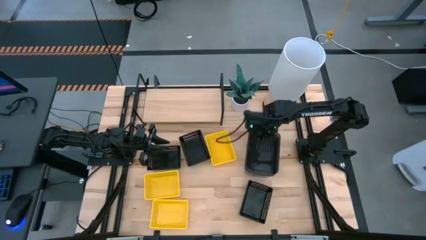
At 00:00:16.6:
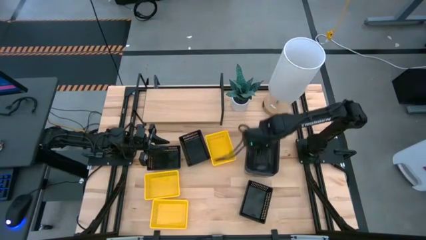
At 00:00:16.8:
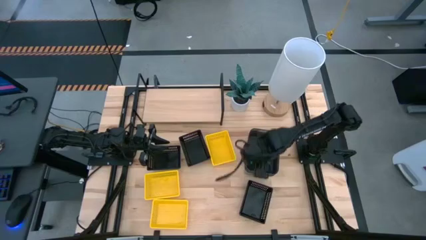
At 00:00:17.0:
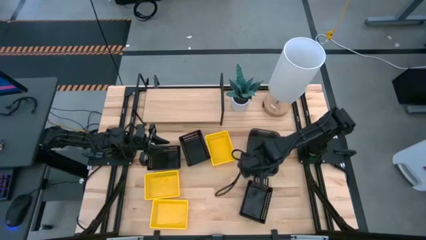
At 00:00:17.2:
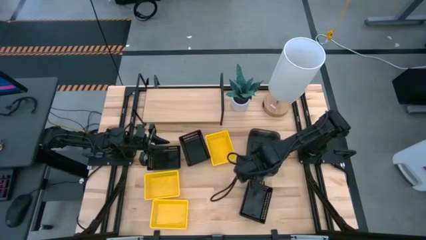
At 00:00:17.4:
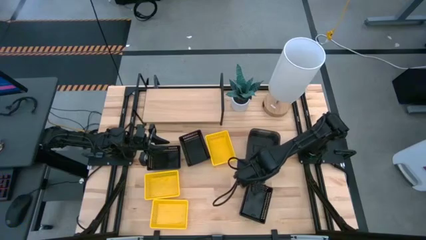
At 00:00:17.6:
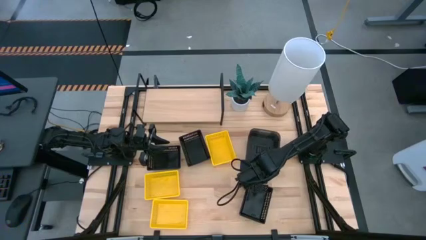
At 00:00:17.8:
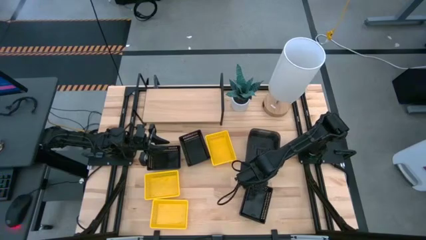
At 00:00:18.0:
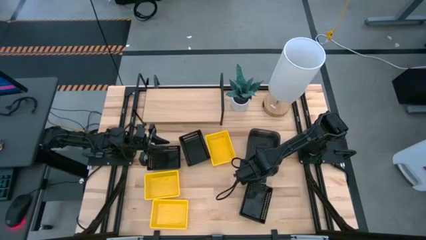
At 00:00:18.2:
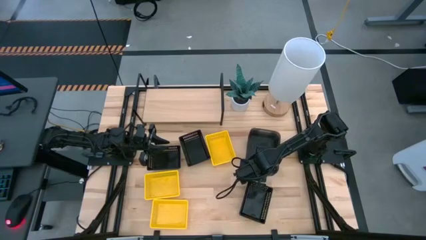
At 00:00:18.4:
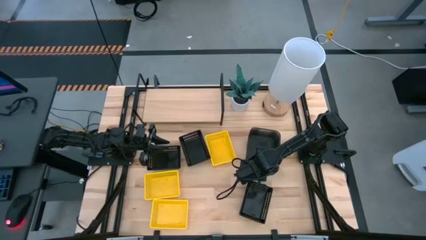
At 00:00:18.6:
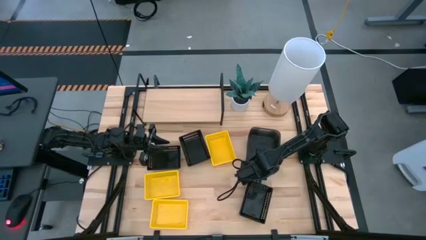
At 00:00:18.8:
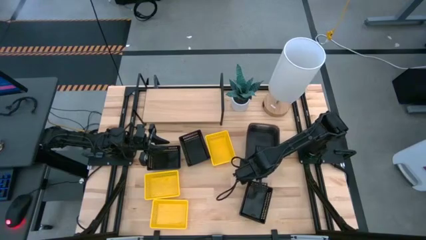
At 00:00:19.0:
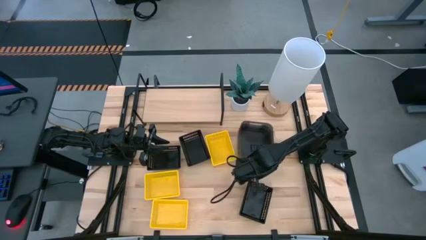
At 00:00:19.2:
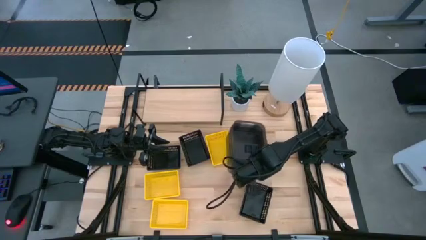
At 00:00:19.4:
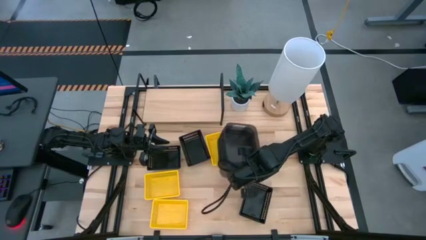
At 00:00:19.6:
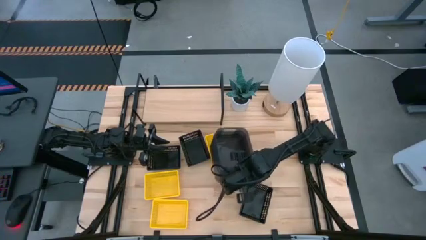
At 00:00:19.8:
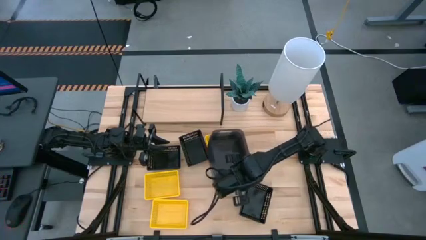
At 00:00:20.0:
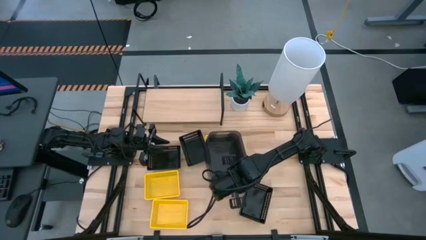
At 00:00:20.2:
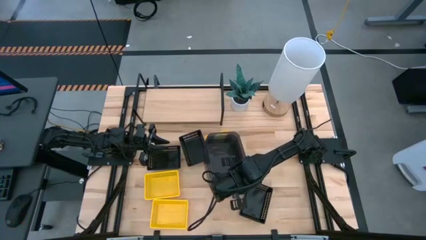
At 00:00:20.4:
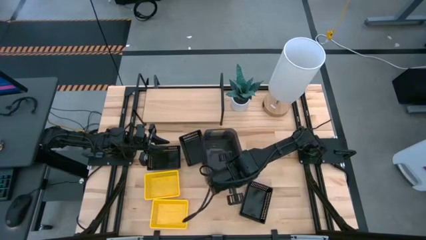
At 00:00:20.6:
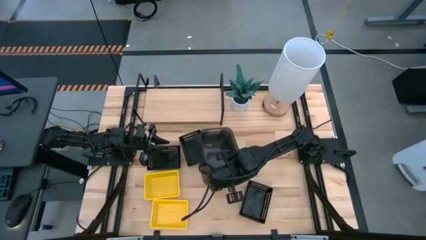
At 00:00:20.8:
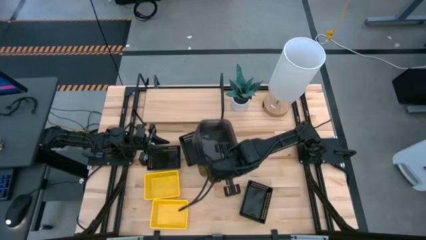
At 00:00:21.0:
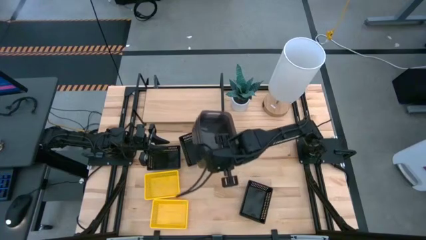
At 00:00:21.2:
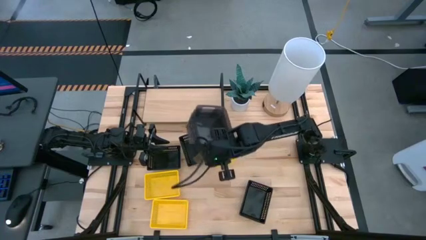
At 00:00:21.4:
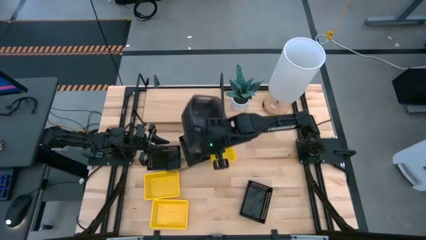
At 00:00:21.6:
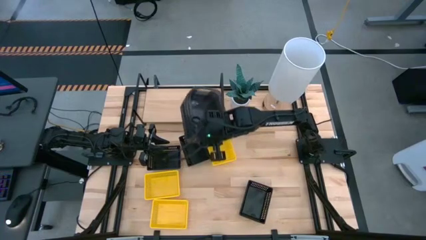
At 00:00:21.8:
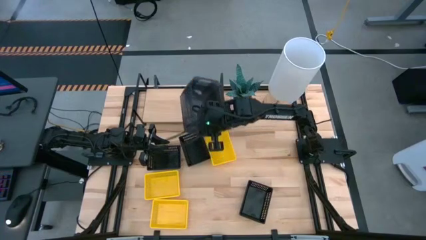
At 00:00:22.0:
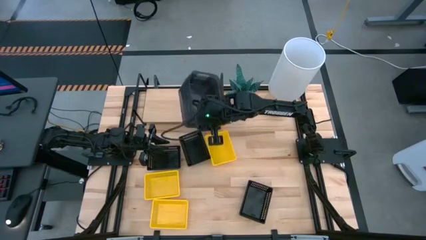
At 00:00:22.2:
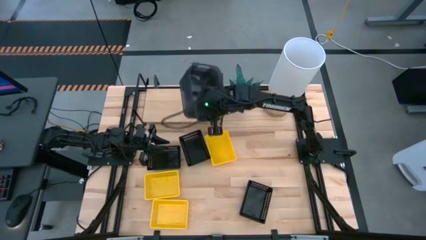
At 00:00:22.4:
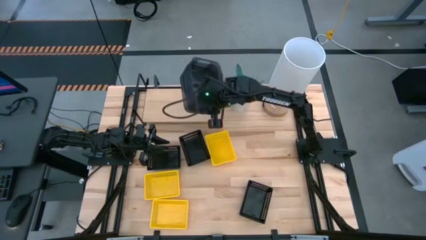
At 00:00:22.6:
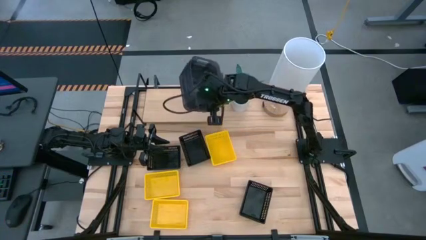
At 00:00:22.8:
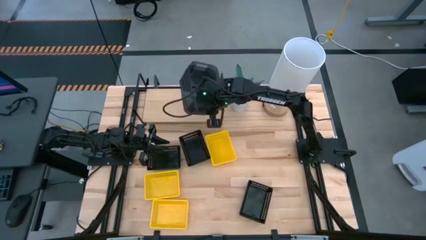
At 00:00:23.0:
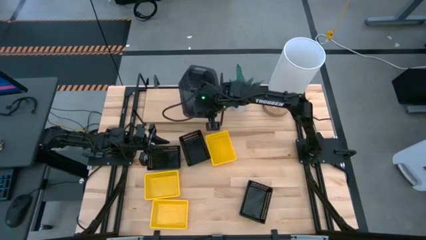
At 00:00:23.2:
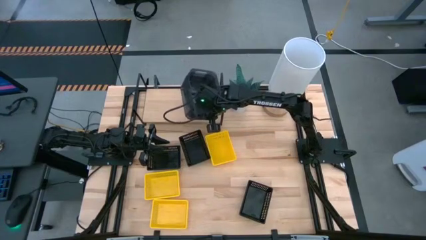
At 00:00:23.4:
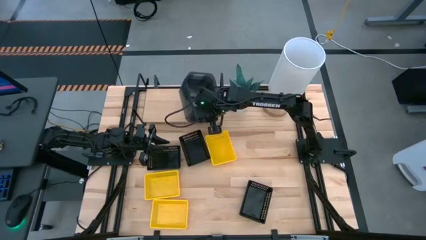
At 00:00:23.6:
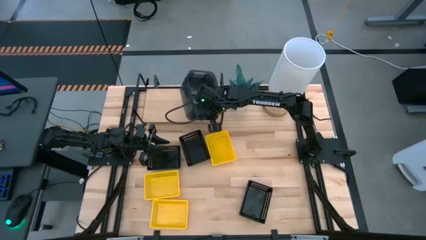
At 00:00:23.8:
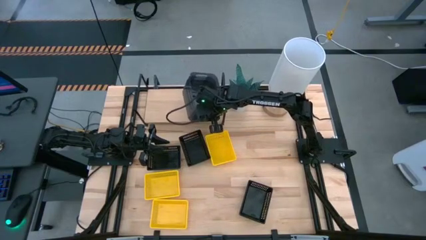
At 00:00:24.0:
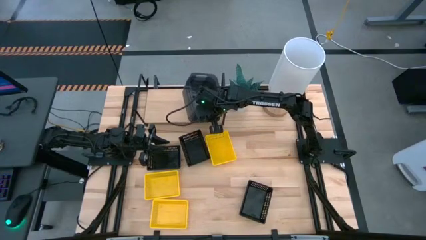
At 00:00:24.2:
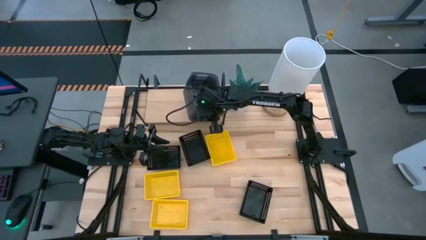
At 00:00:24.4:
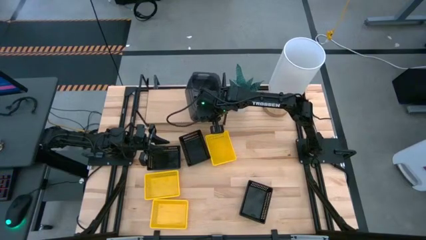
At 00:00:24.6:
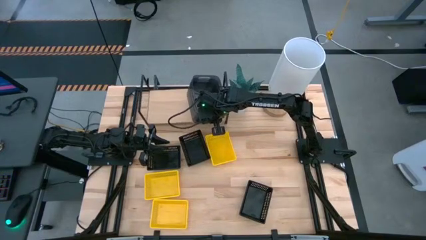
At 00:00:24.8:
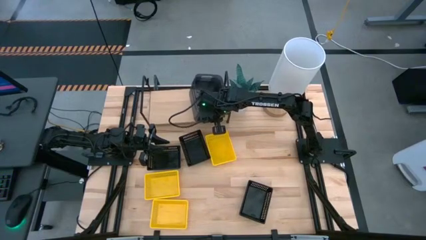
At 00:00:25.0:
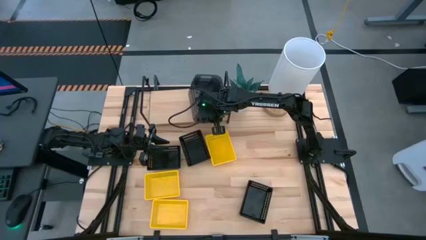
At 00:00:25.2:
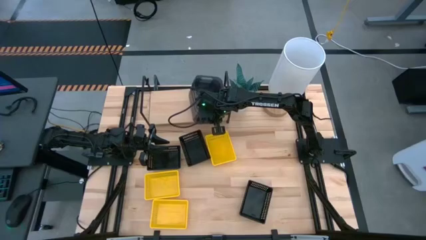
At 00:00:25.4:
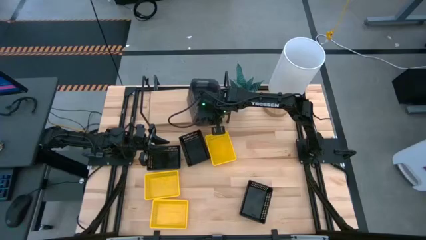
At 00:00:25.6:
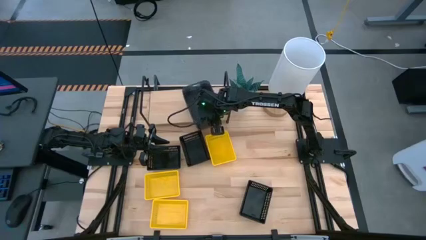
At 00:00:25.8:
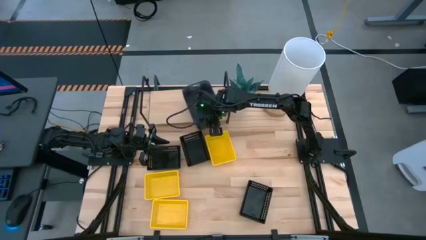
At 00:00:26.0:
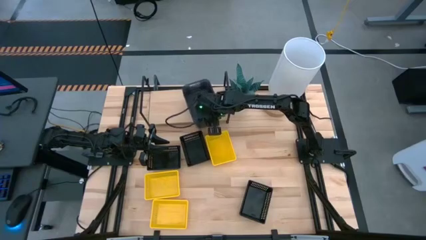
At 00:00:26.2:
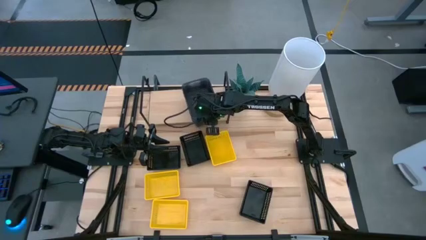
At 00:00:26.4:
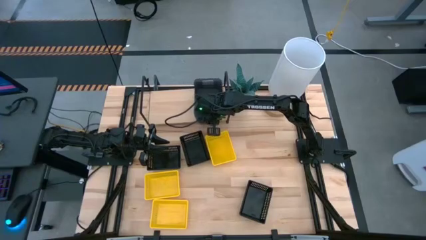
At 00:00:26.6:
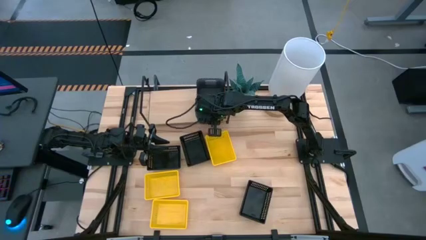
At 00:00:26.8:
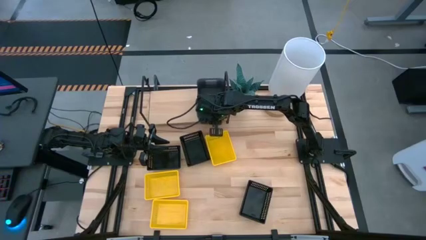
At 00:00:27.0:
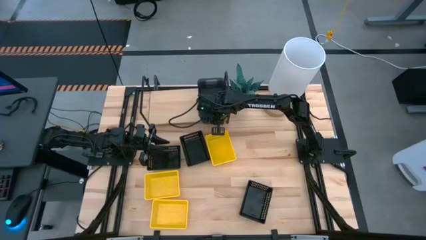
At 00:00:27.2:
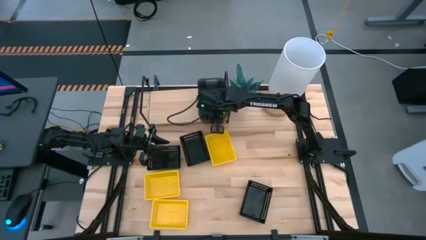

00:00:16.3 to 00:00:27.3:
Task: Stack baskets on shelf by color
Put the stacked black transparent bins on the shelf
